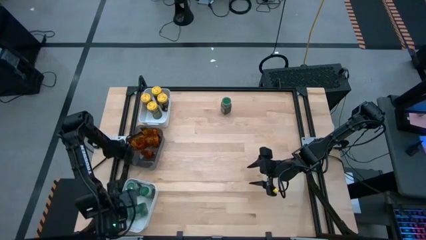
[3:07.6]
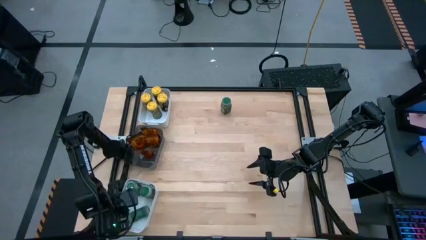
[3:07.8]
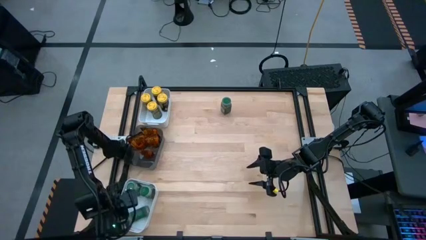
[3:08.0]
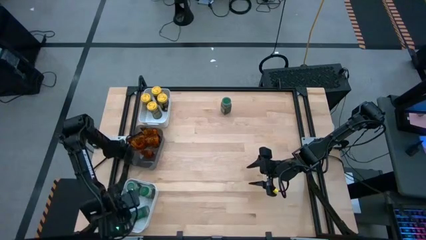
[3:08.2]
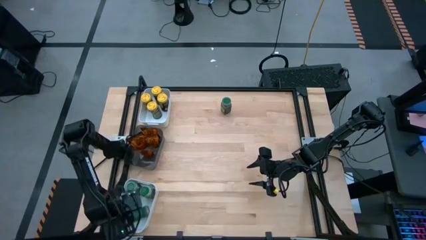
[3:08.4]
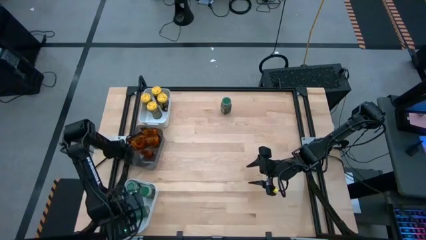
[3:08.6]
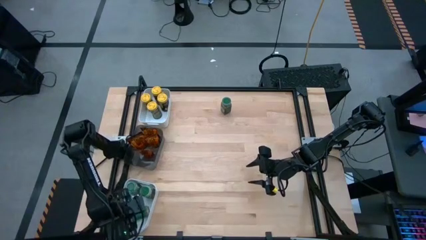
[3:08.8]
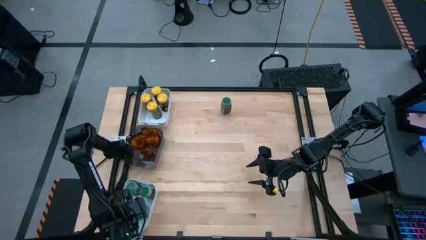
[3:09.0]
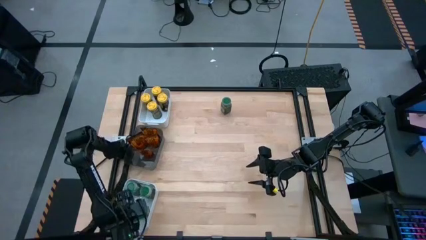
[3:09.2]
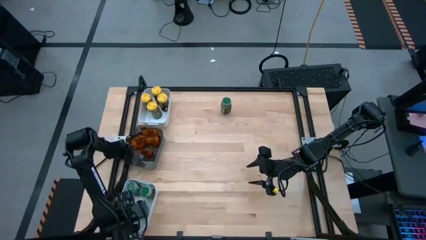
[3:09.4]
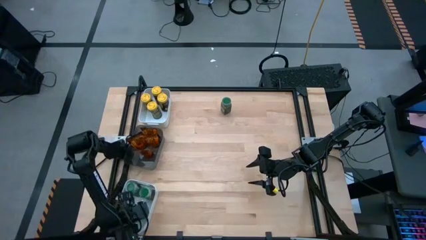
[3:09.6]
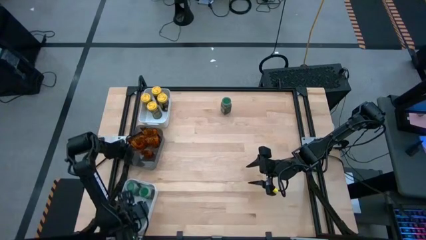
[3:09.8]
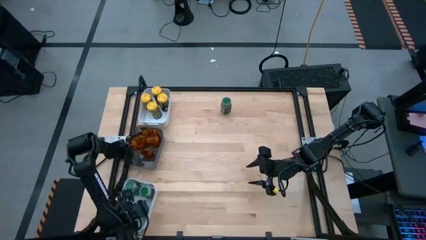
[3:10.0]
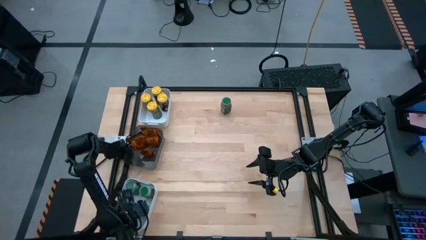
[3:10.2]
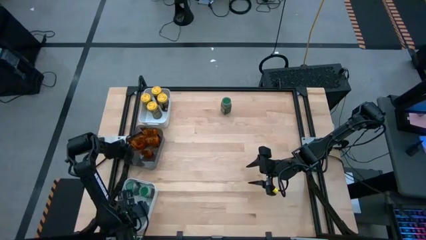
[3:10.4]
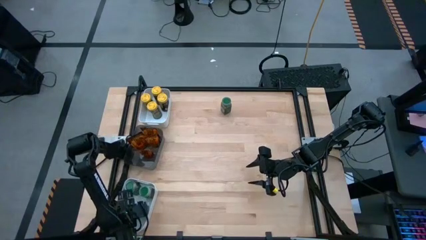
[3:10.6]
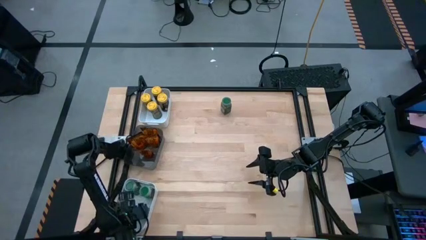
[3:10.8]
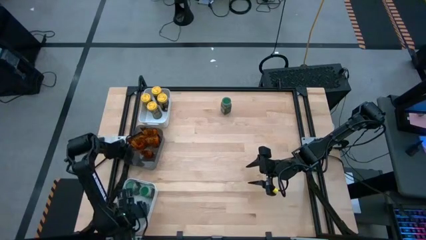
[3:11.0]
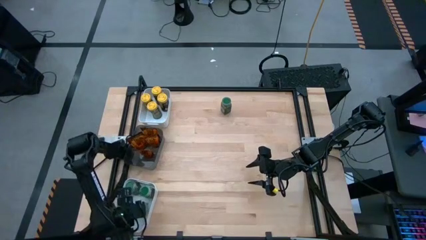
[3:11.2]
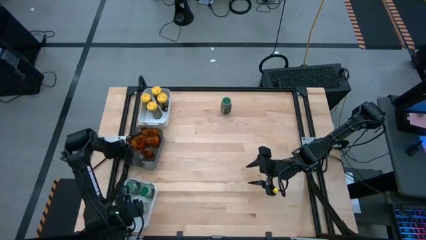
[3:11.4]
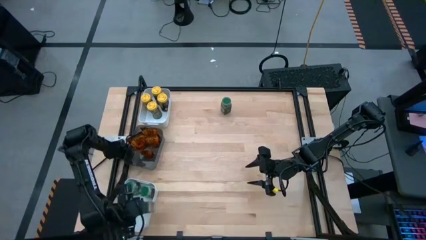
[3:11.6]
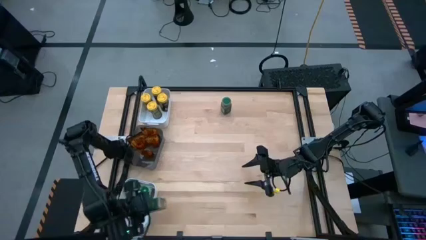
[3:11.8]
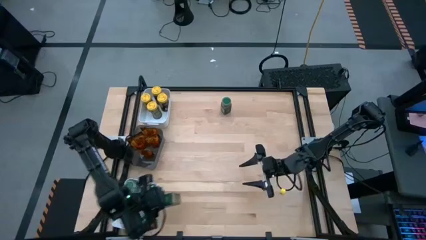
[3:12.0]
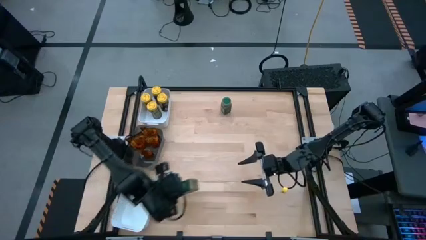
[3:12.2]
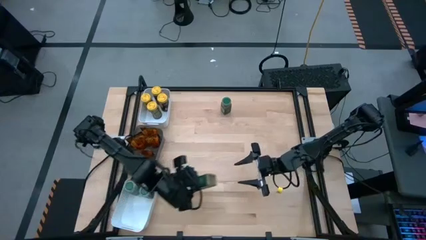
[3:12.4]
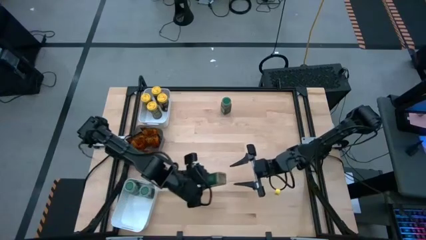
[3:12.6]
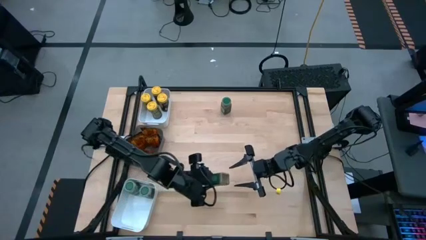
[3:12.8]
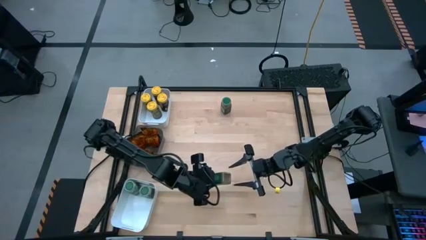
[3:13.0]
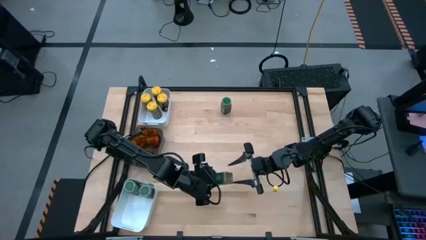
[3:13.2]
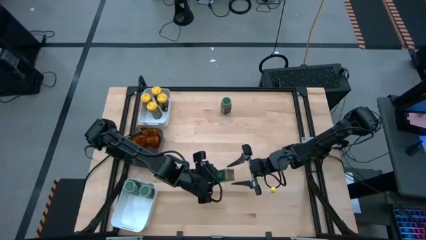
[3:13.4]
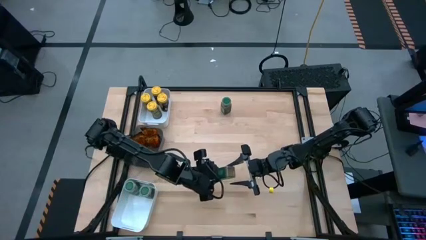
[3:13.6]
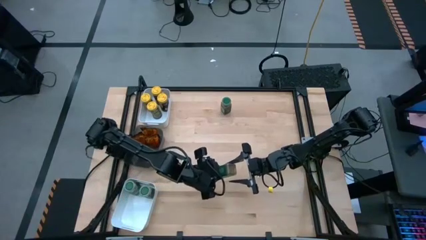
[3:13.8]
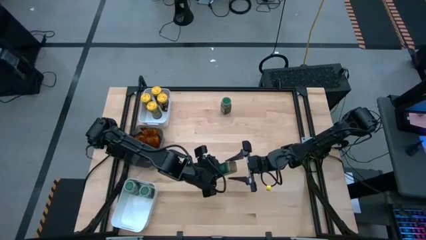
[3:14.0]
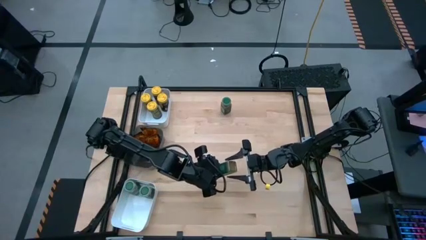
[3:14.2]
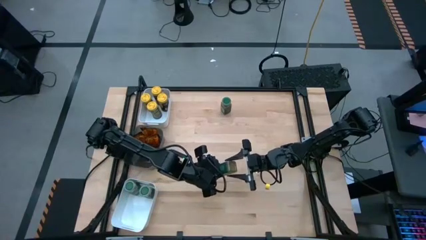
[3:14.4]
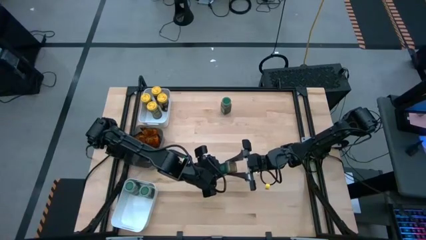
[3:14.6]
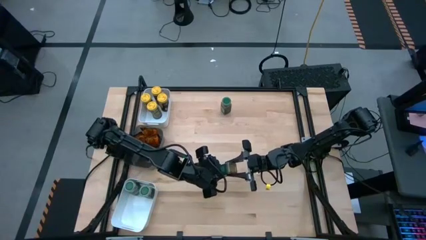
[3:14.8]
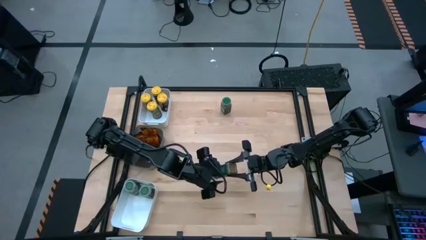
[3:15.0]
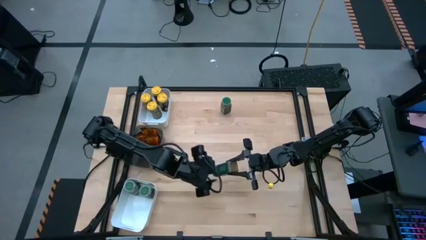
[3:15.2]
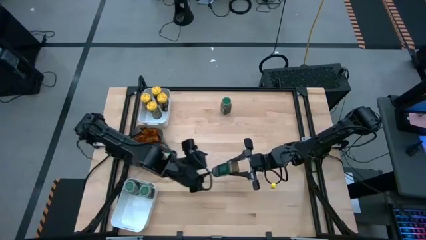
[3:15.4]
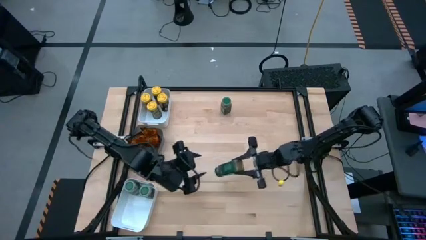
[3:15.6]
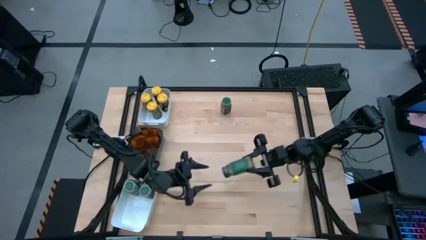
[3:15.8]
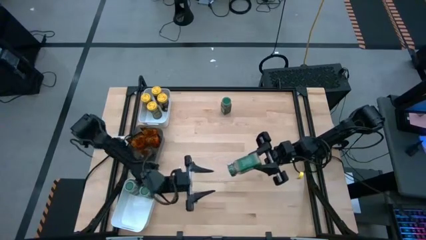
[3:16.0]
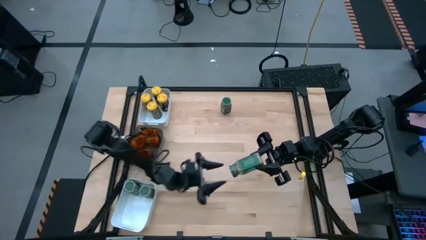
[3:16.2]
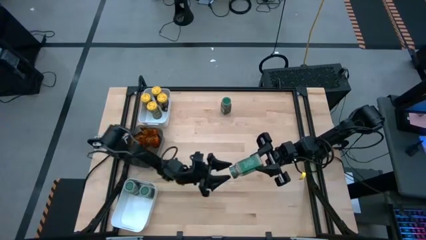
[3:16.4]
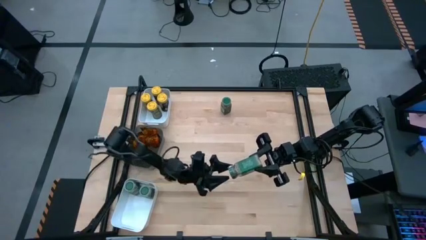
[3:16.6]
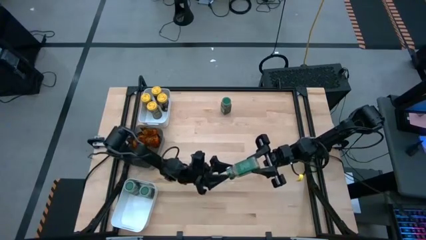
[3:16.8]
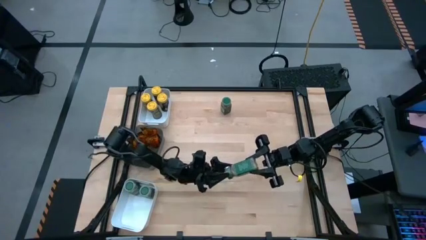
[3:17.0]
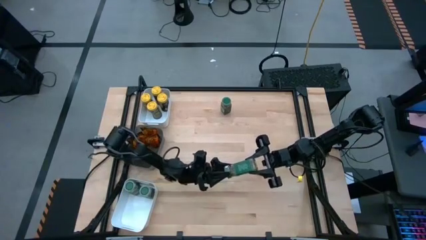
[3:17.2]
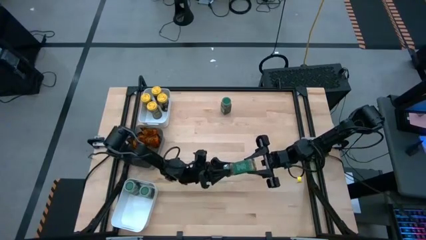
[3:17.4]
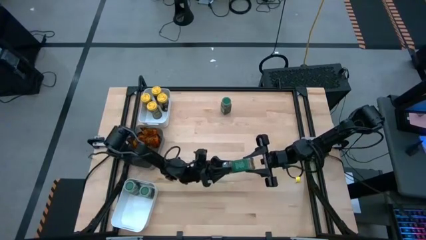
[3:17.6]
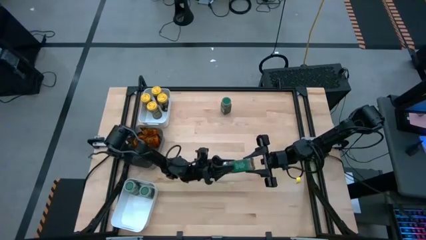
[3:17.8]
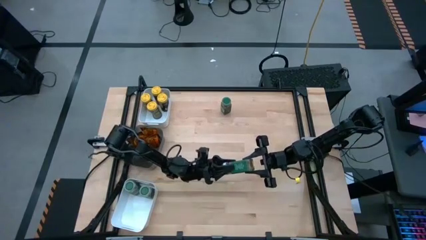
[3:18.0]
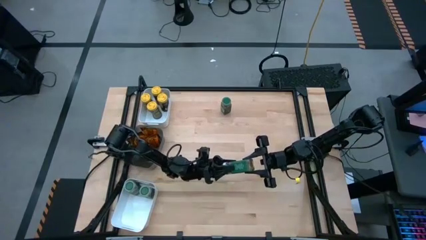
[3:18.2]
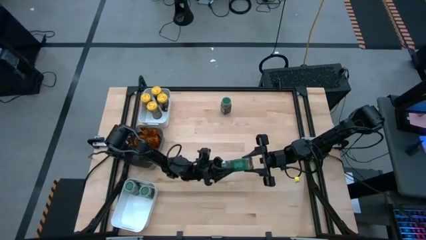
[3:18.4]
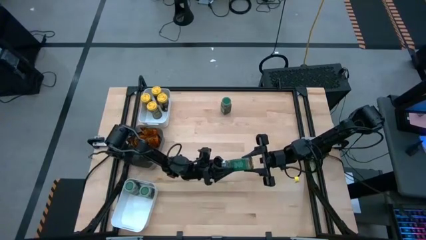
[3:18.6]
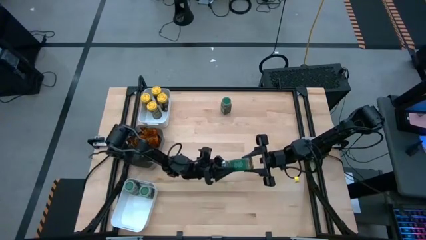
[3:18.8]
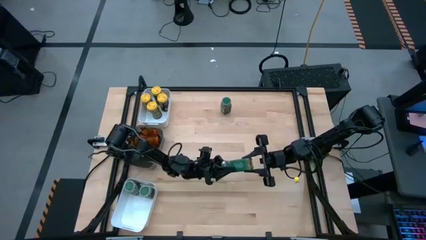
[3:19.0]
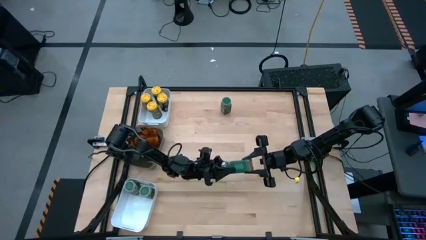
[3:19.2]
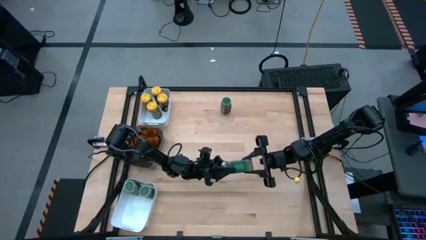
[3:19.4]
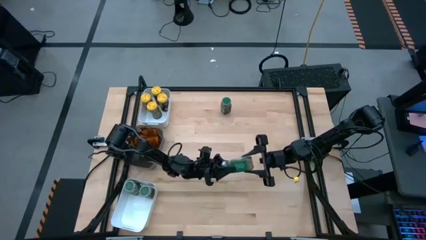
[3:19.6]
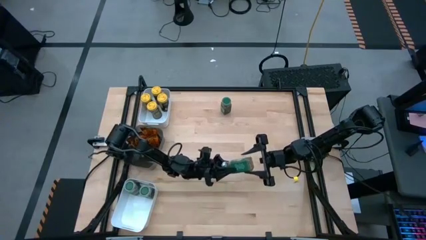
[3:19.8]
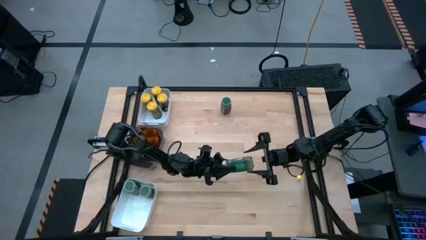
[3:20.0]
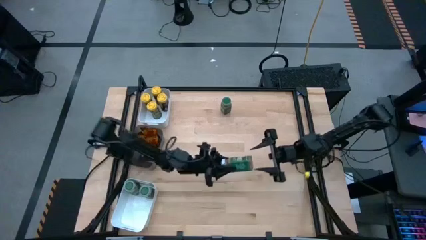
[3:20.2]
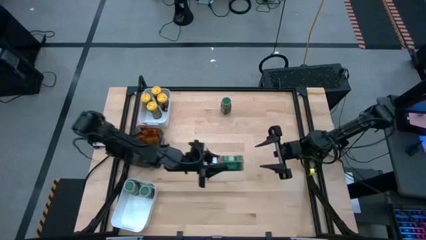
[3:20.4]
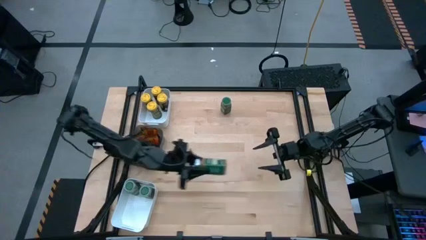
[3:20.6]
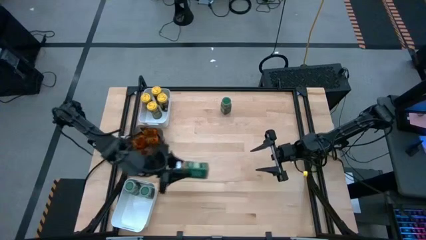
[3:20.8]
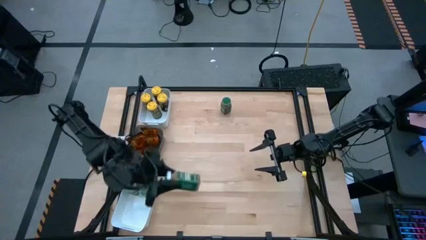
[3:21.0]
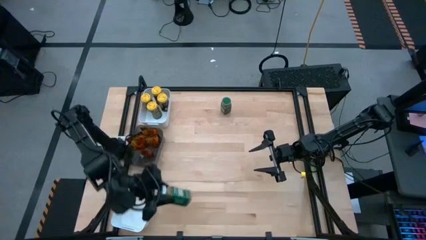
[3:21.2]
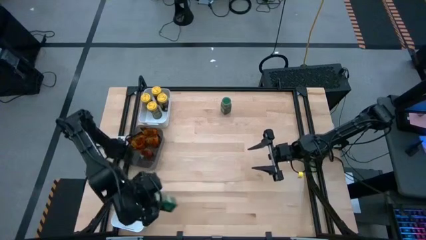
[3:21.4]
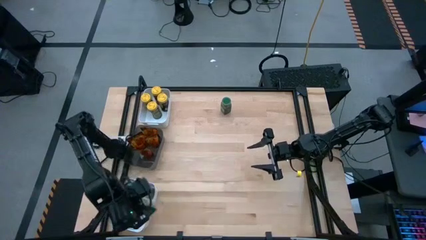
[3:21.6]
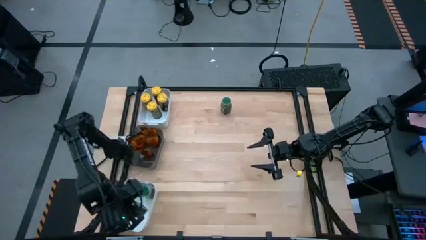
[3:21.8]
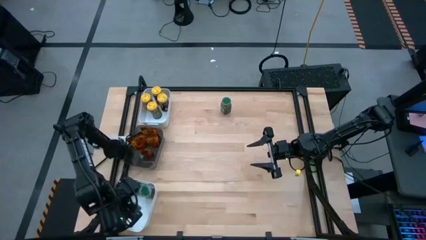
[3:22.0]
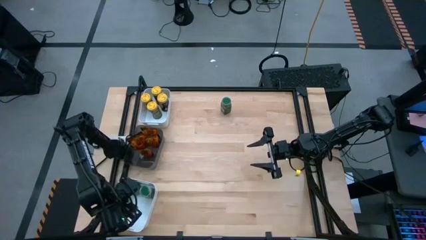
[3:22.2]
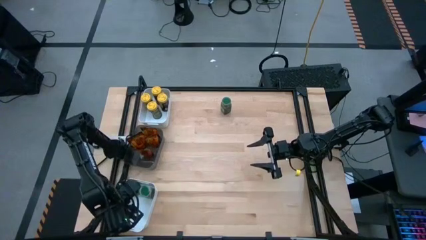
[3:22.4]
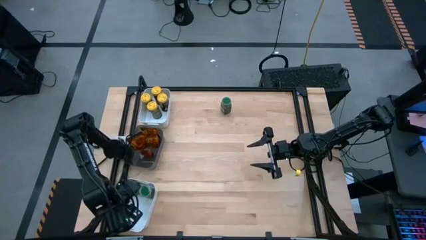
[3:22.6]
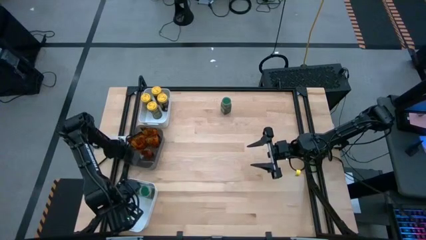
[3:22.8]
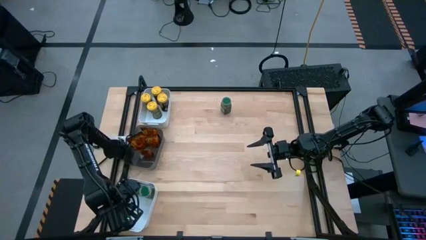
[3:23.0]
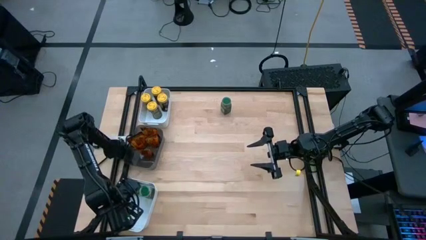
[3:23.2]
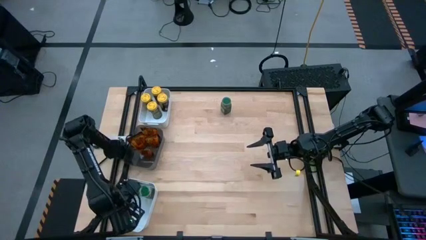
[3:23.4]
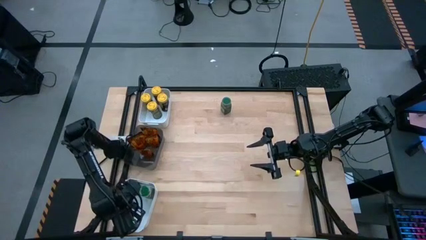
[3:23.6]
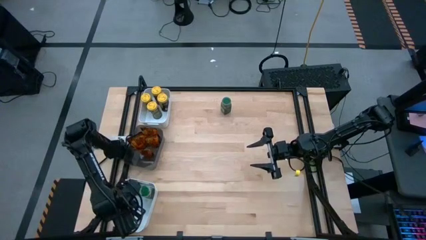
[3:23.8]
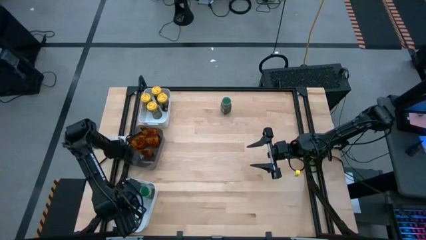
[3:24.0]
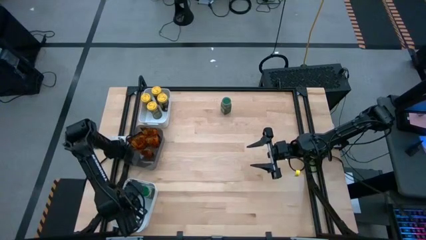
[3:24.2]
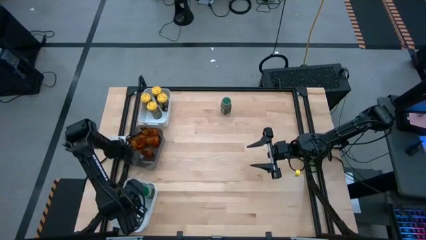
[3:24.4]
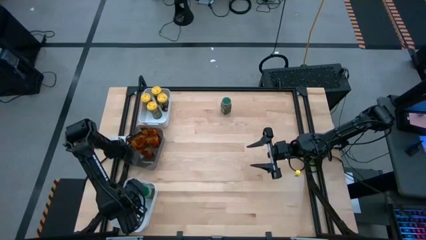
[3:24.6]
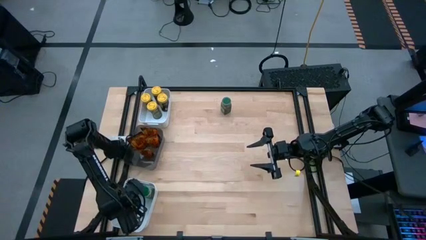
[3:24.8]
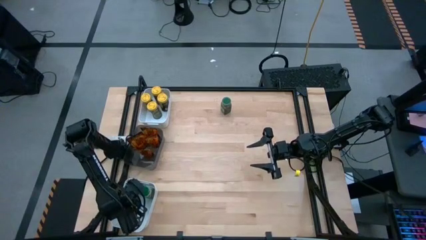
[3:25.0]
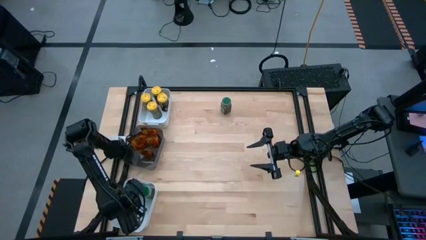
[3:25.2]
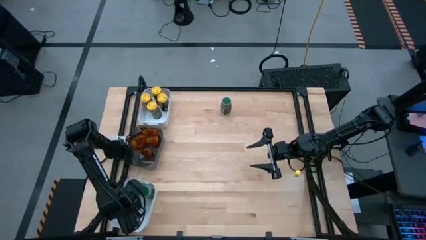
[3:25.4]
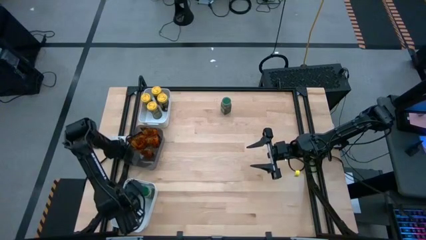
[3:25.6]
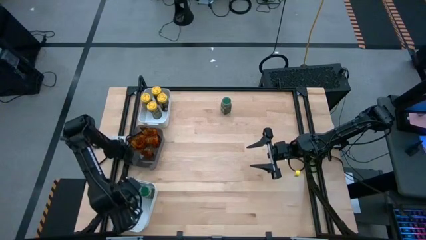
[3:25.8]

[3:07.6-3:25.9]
Task: Sort spices by type
Put the right green seasoning bottle into the bottom white bin
